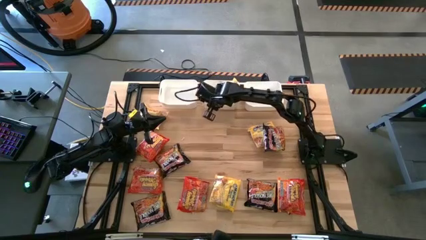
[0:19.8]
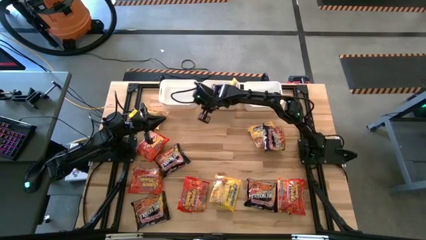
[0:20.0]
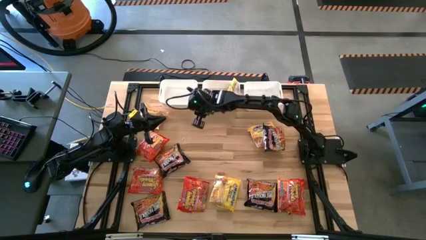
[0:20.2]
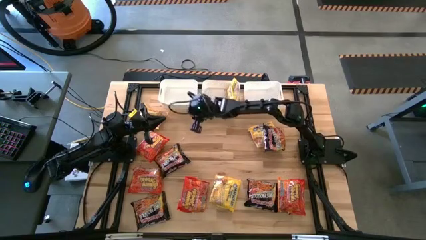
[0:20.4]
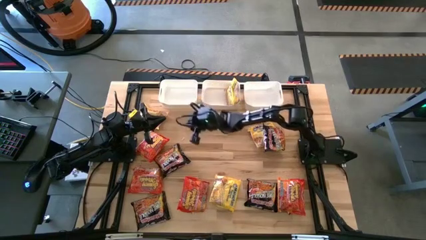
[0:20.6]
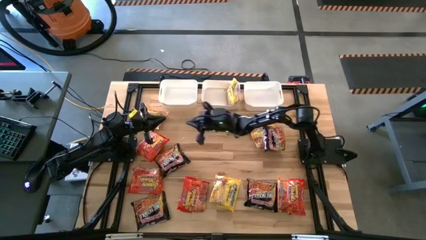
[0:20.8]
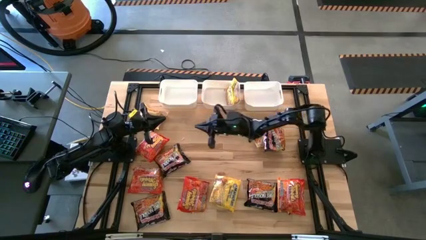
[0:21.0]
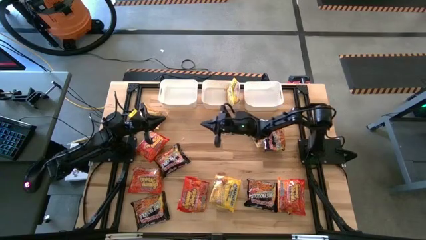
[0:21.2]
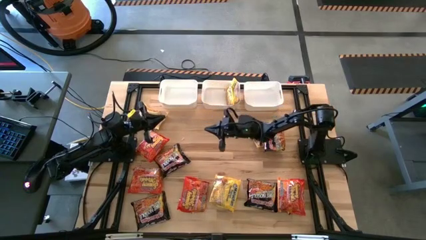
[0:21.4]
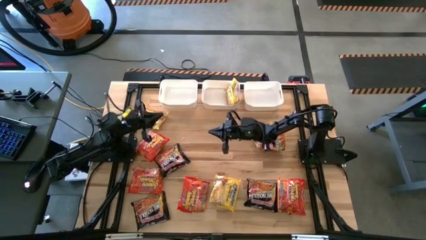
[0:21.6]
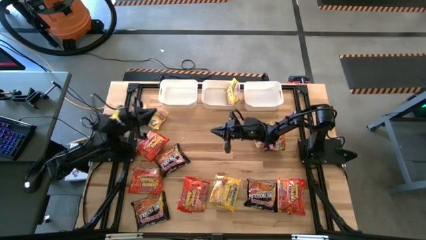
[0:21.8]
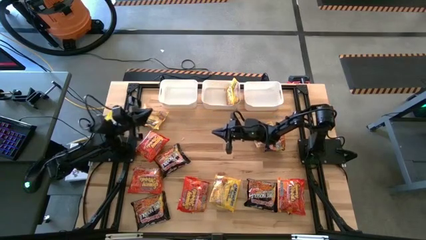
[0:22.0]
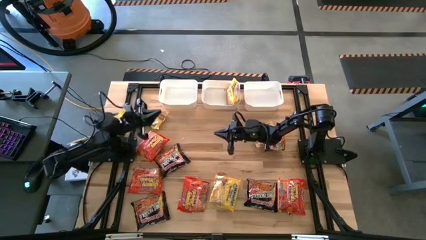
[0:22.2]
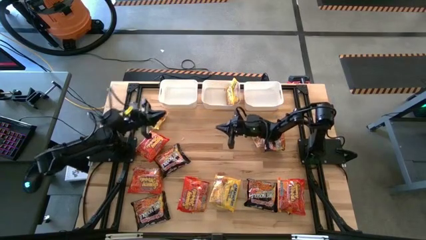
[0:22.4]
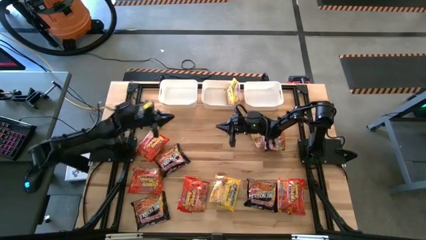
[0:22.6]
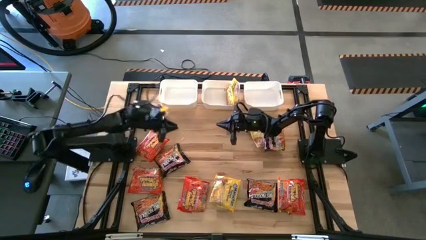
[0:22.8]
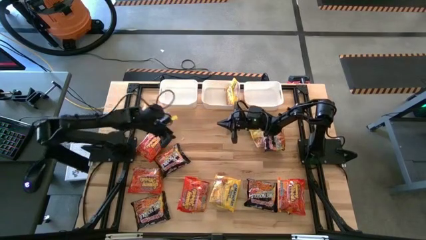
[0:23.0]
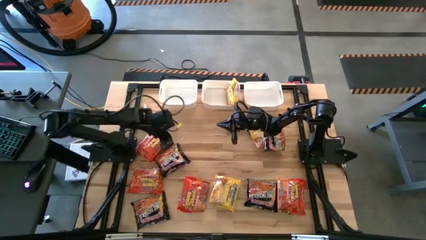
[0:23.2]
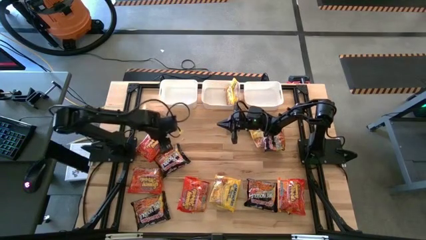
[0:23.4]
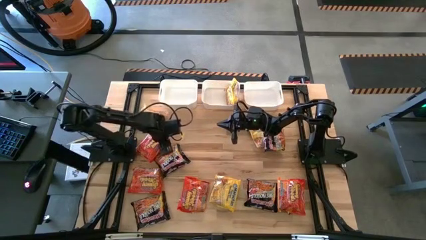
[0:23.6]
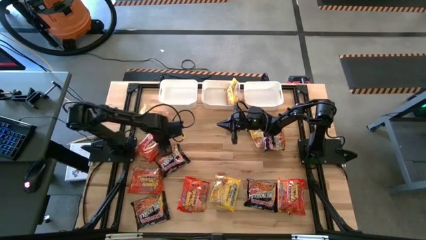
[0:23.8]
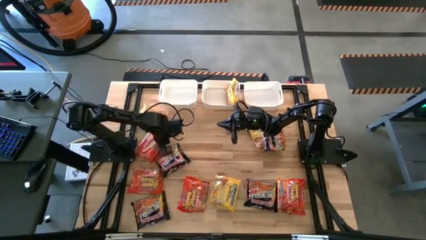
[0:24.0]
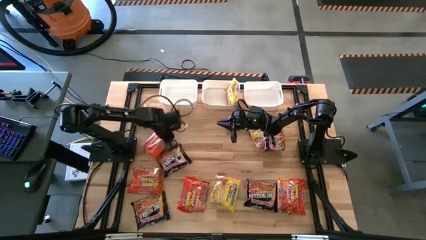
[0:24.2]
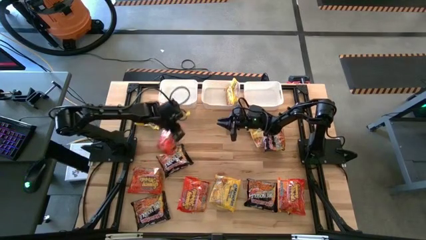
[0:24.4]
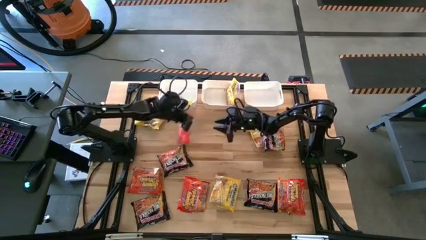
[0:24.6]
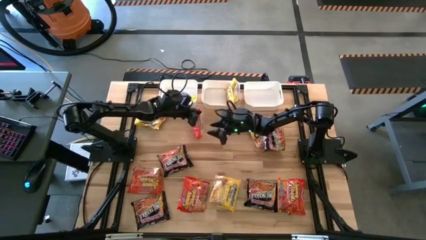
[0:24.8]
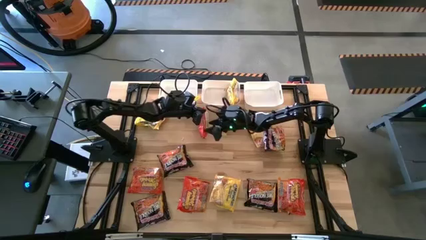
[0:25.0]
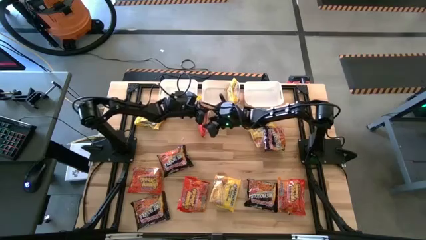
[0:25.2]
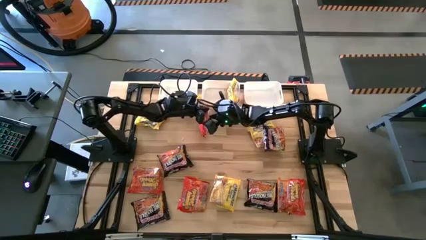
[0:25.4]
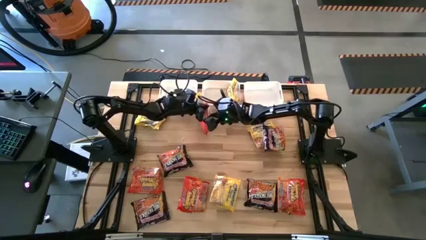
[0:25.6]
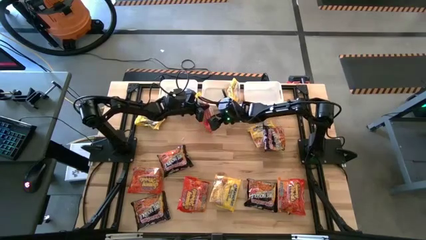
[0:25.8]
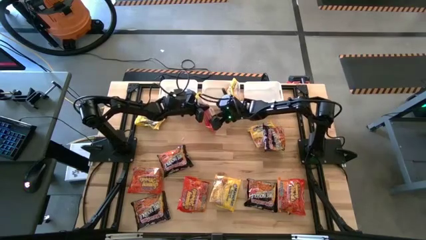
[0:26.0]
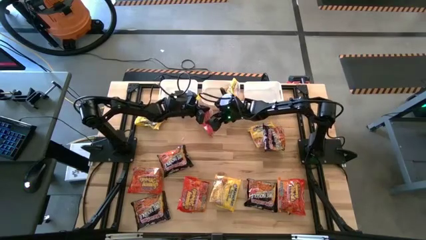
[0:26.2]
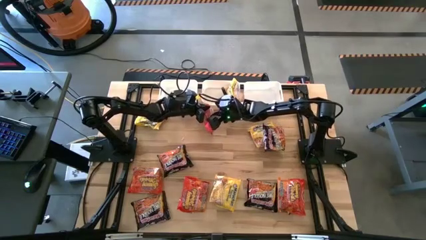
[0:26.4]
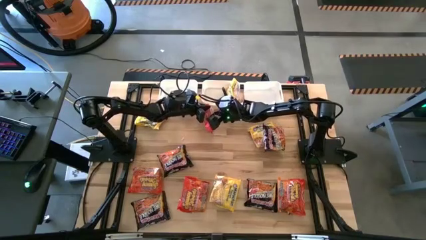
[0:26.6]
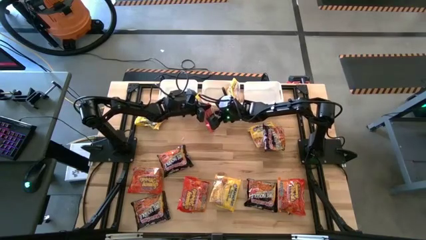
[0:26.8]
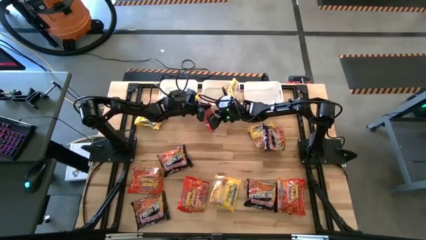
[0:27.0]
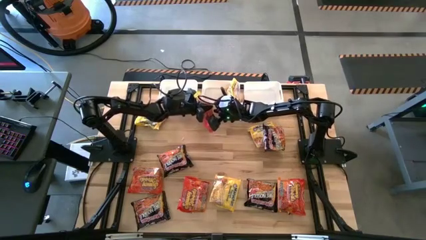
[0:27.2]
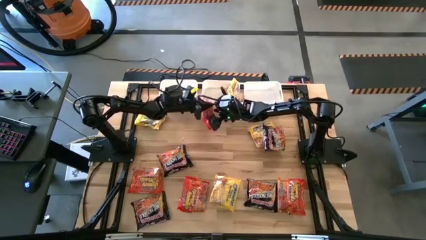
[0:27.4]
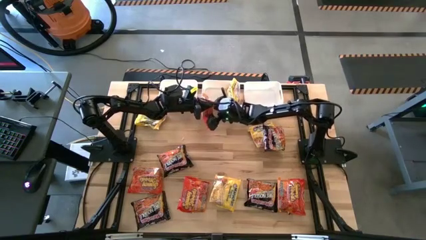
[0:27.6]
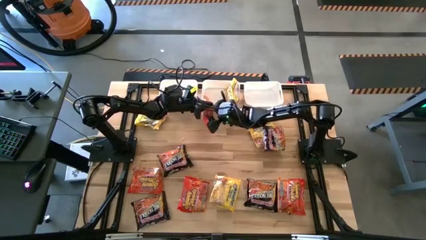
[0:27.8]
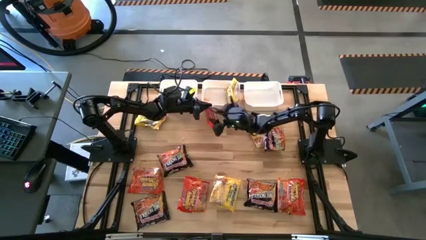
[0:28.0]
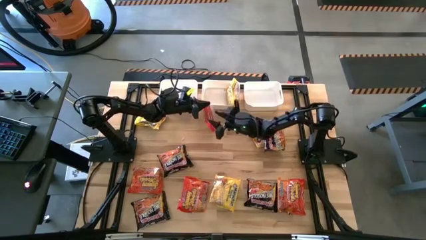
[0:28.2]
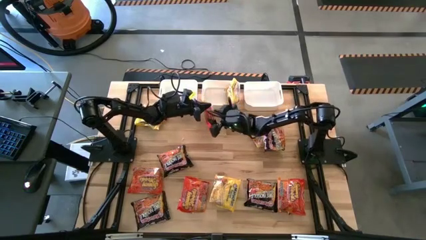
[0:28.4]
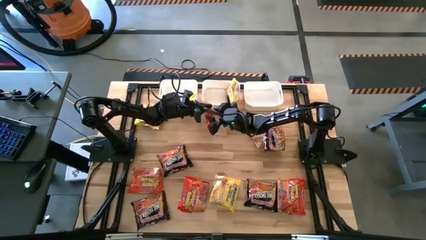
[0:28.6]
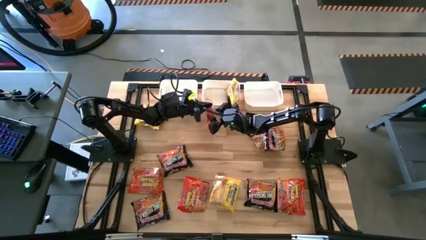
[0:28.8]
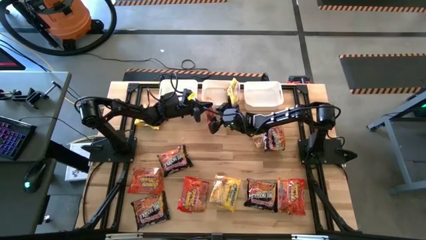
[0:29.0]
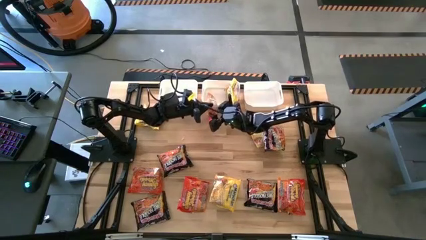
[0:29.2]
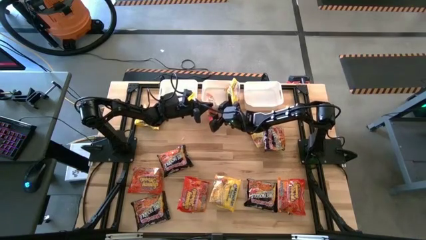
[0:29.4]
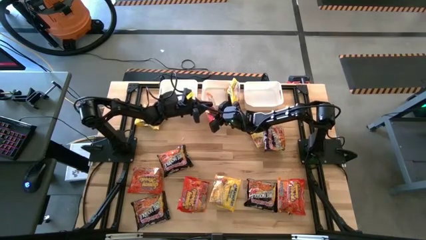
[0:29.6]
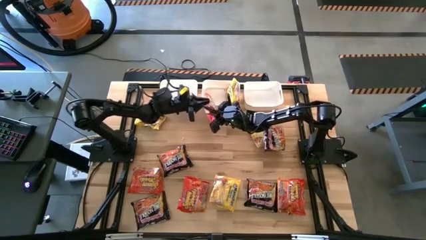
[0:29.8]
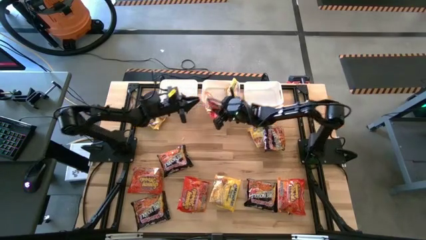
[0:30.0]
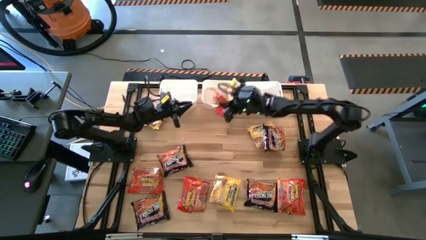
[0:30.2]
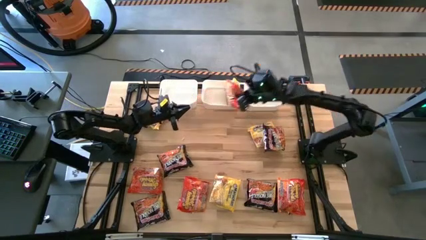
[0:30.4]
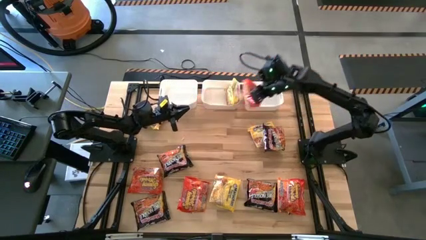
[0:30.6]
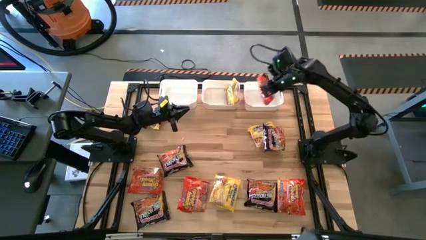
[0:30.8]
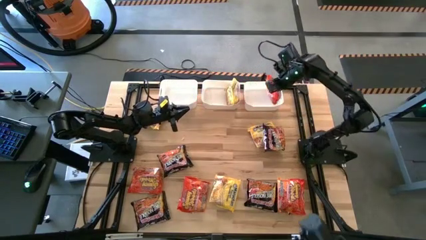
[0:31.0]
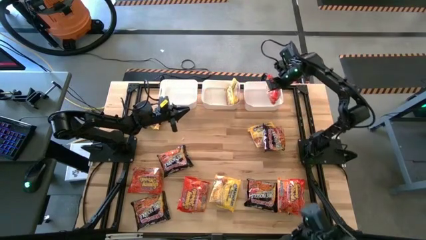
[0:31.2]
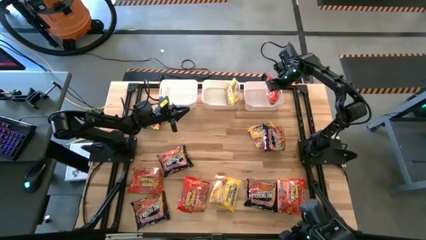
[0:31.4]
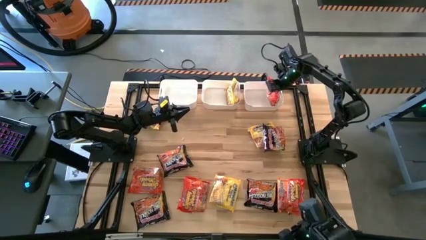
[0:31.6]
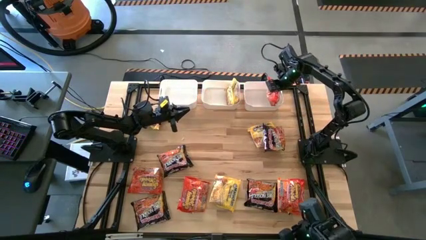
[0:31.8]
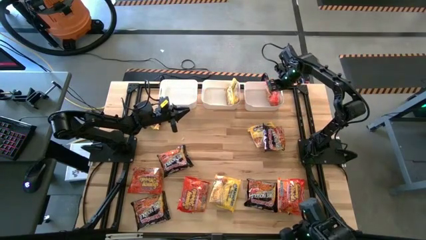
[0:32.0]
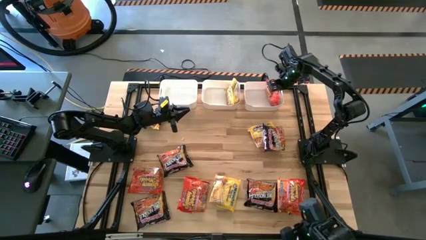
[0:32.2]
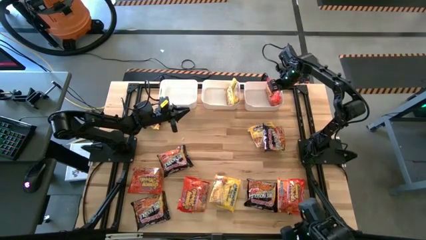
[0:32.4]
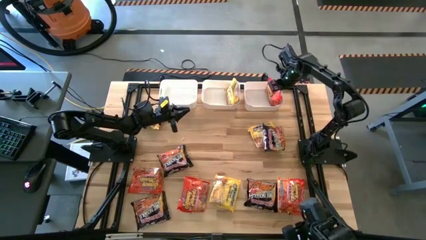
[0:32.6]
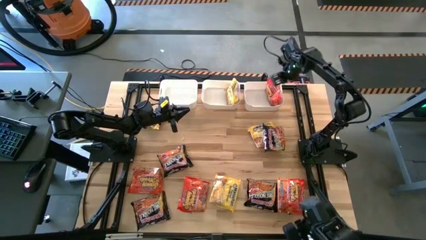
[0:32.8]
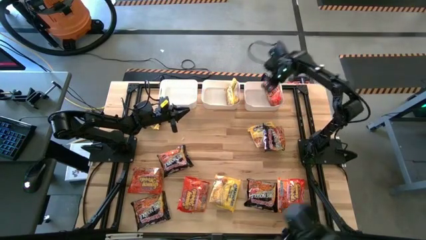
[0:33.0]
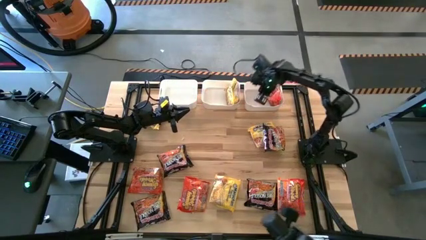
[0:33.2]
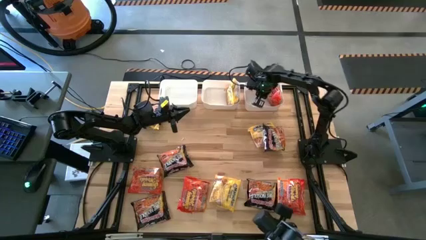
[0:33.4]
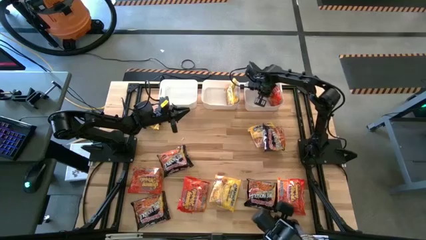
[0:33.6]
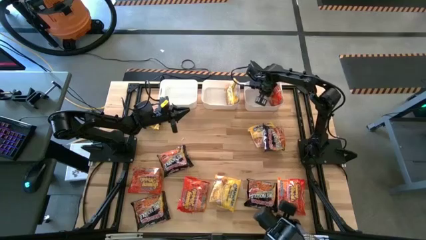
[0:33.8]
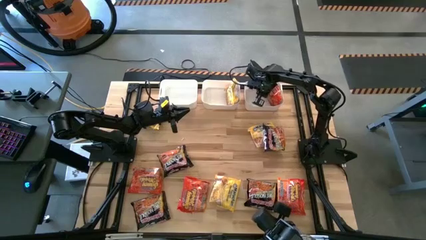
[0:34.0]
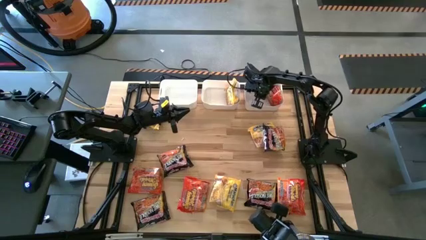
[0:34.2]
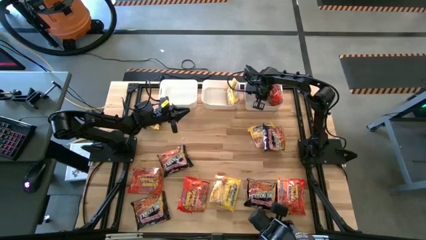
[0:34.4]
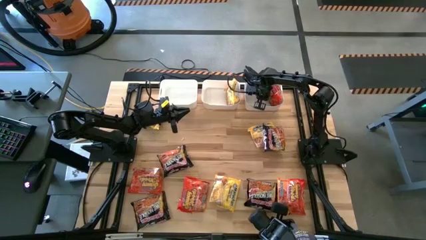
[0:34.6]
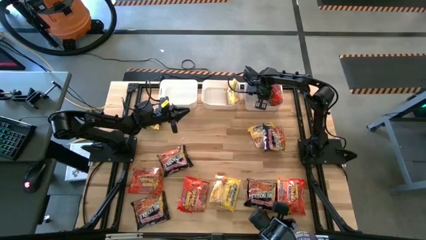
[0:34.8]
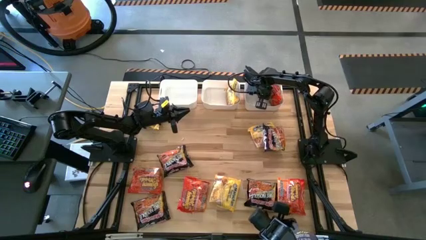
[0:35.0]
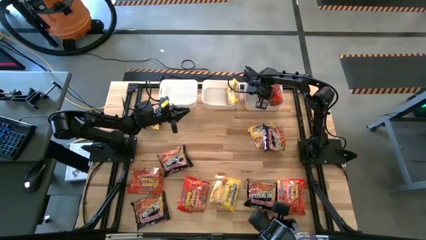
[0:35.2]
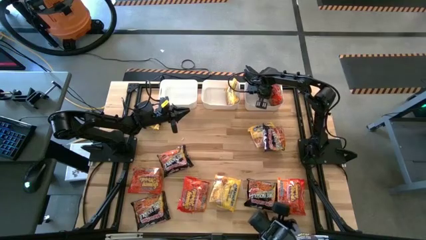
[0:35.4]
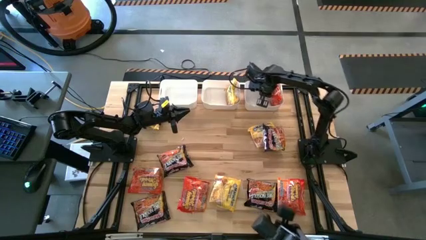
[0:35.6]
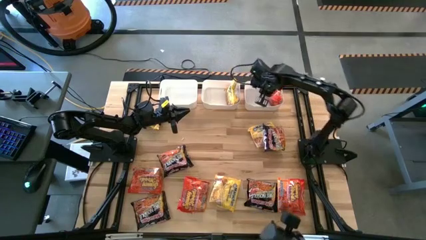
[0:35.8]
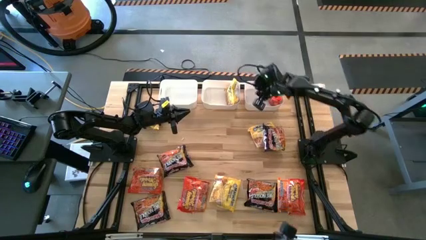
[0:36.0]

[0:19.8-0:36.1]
Task: Sort Maruchan noodles
Put the orange noodle into the right white bin
